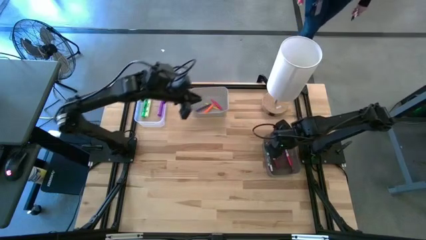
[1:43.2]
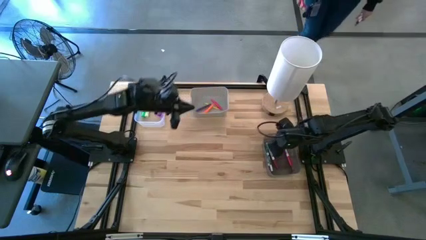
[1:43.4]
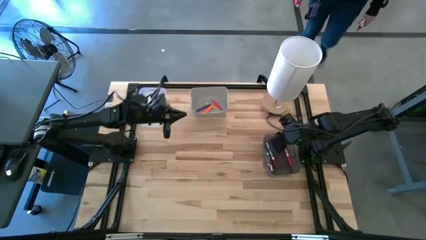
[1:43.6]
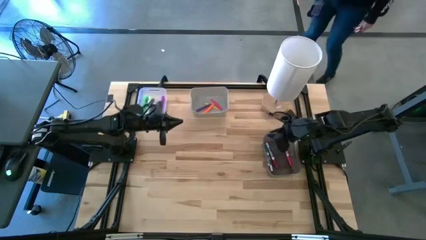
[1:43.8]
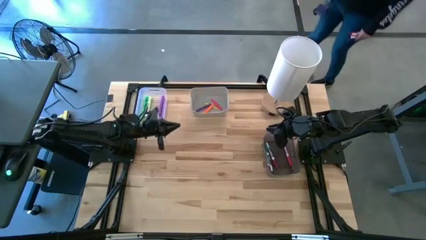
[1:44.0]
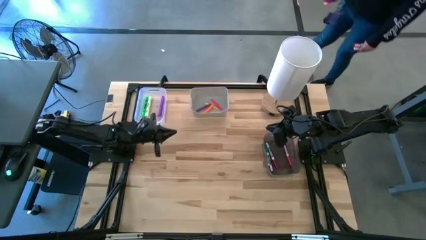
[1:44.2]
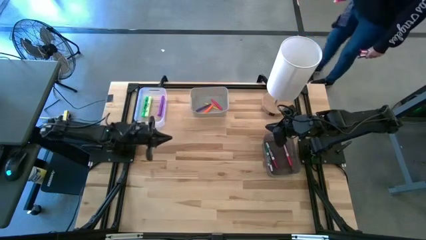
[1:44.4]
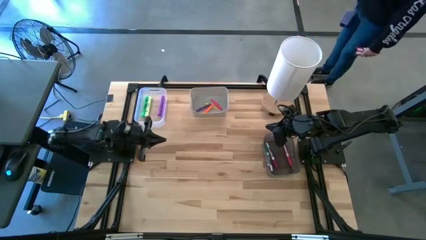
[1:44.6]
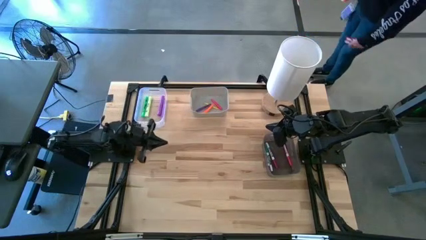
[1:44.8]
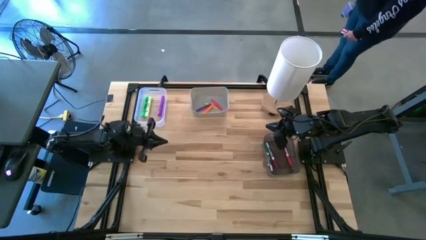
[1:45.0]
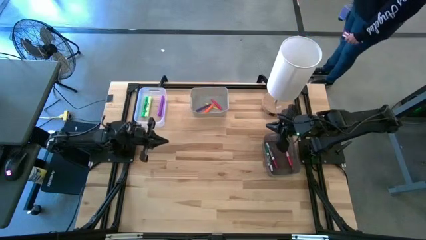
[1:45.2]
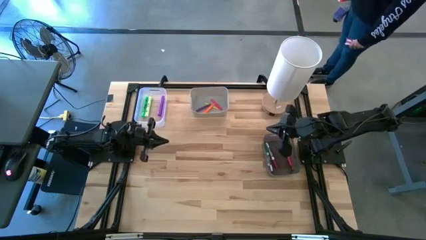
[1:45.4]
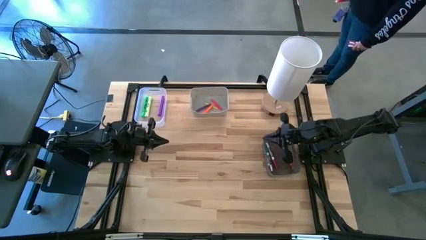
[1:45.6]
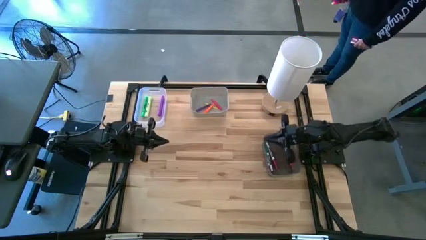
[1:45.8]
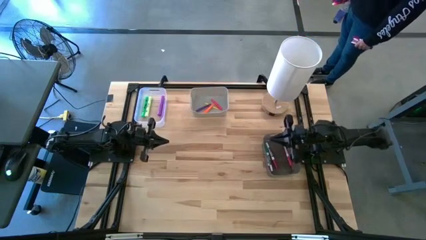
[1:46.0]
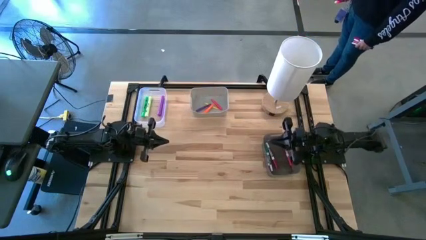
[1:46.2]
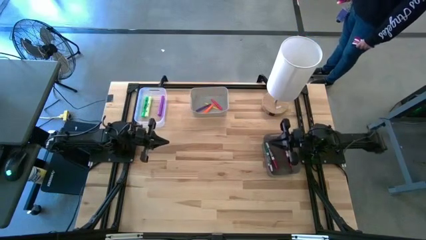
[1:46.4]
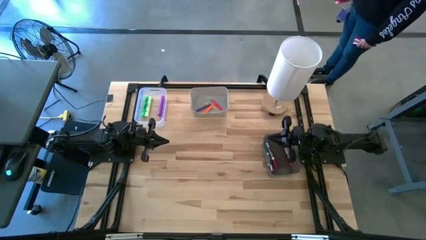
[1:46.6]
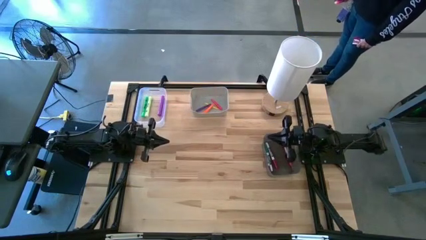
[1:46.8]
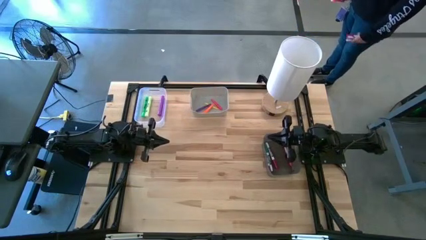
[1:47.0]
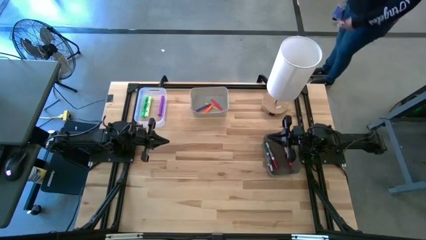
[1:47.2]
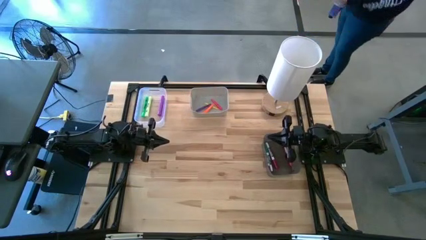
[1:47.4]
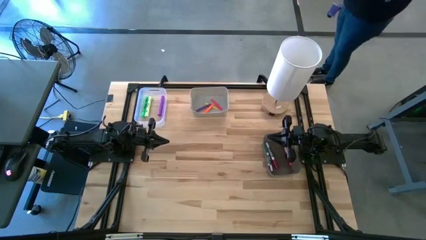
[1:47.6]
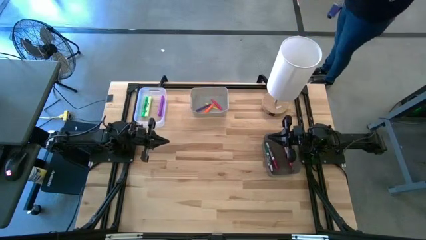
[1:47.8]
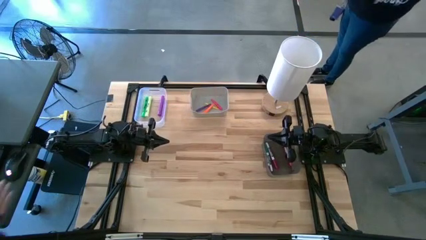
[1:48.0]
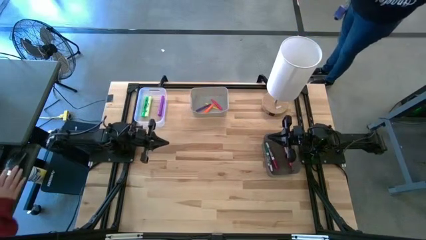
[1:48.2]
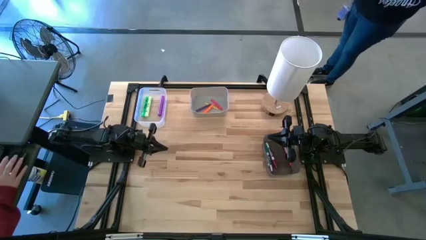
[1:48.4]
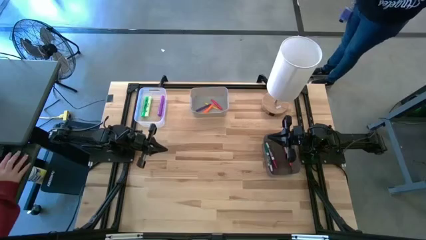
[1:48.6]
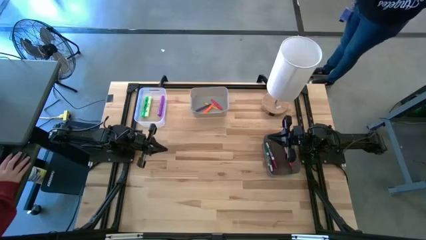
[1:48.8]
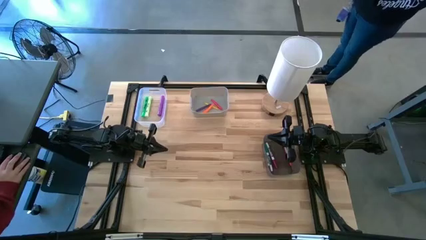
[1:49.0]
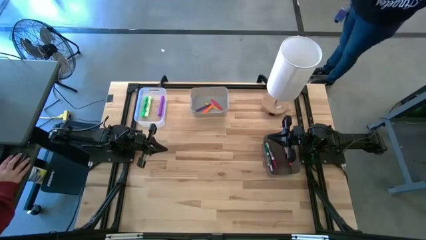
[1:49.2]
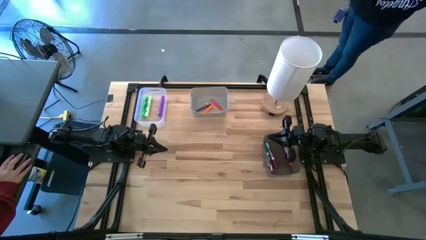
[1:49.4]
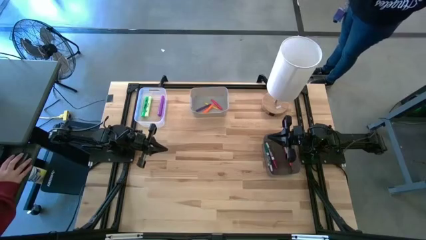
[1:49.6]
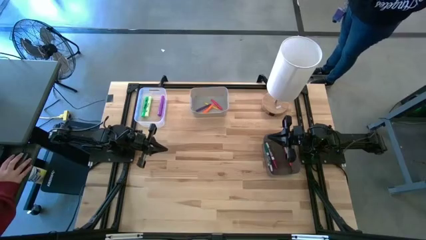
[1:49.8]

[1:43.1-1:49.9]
Task: Pick & Place Markers
Return to Home Position

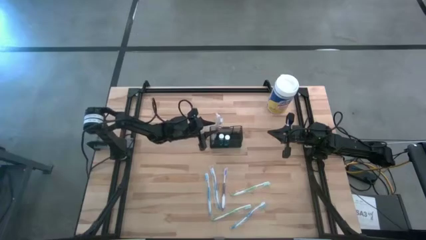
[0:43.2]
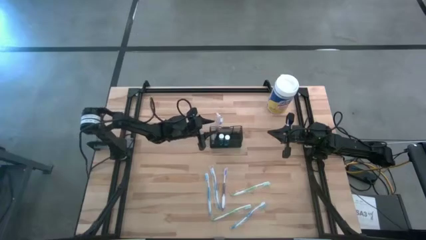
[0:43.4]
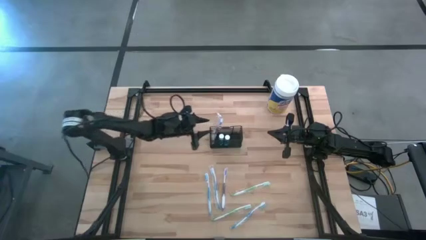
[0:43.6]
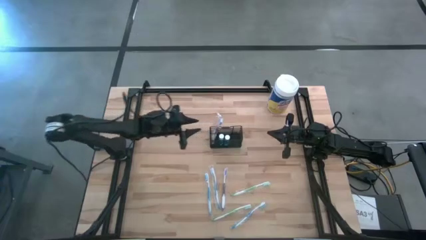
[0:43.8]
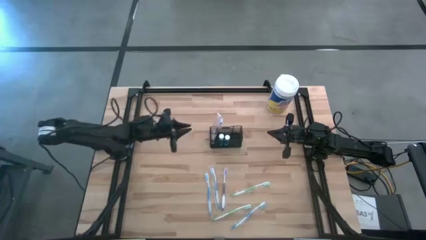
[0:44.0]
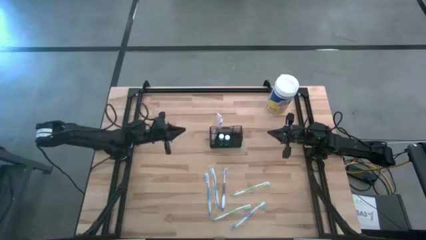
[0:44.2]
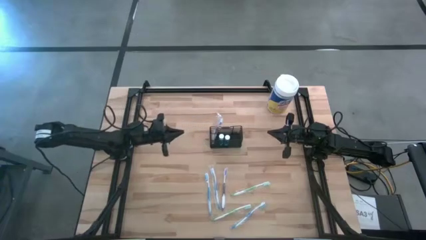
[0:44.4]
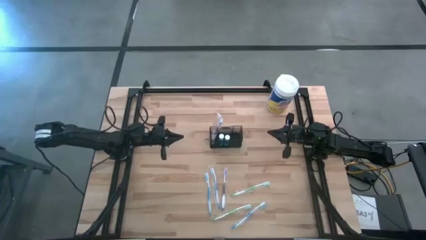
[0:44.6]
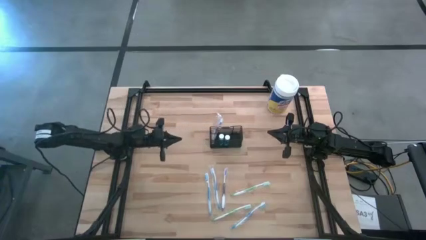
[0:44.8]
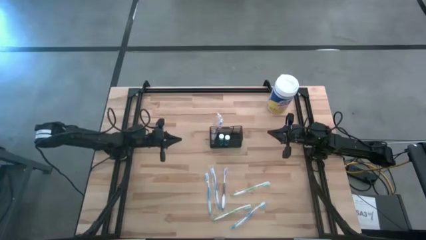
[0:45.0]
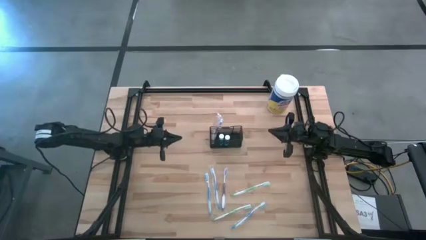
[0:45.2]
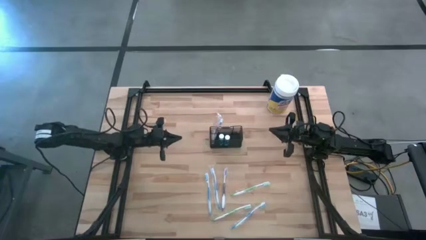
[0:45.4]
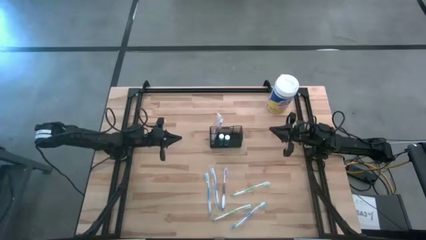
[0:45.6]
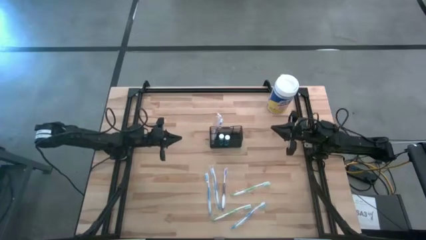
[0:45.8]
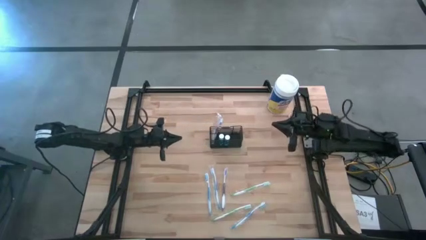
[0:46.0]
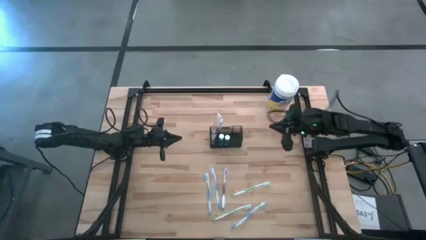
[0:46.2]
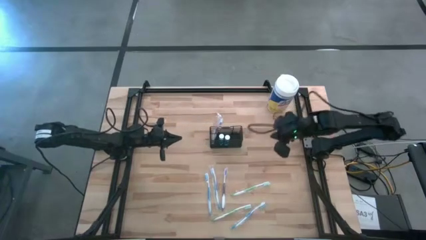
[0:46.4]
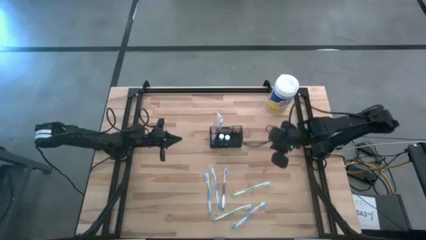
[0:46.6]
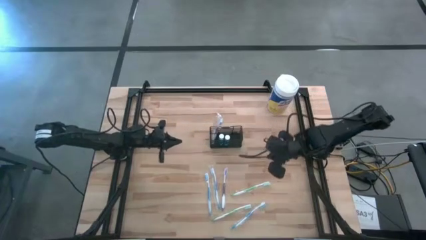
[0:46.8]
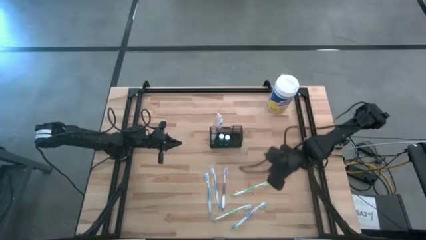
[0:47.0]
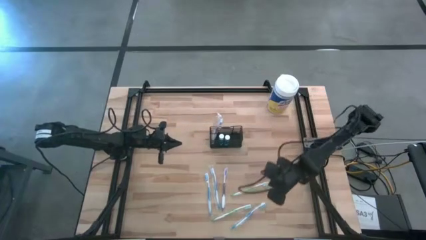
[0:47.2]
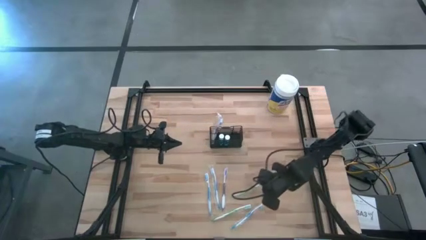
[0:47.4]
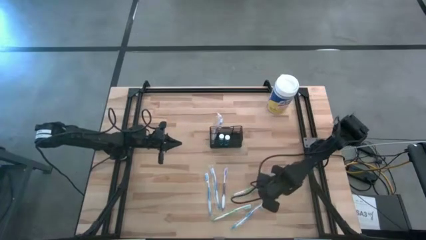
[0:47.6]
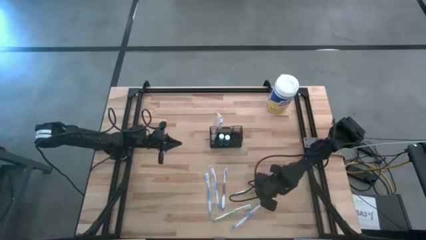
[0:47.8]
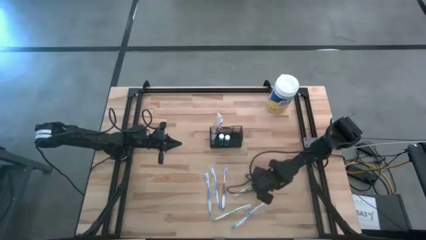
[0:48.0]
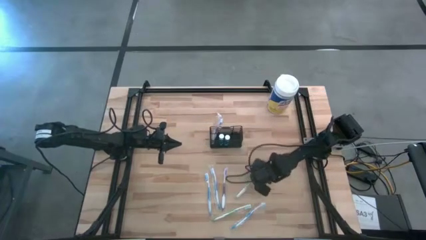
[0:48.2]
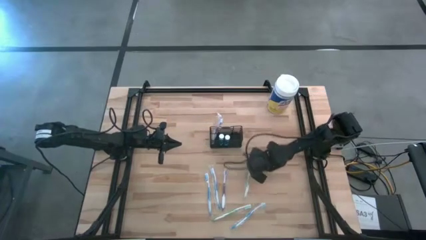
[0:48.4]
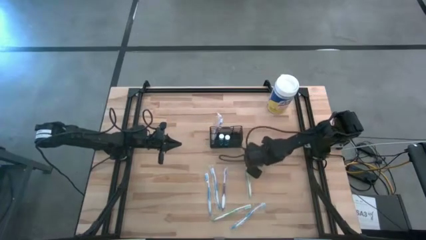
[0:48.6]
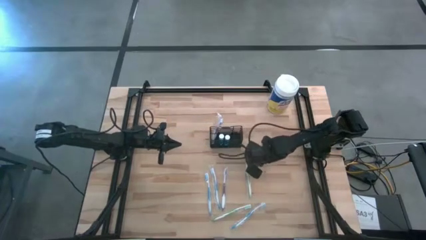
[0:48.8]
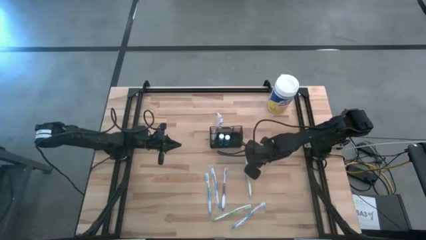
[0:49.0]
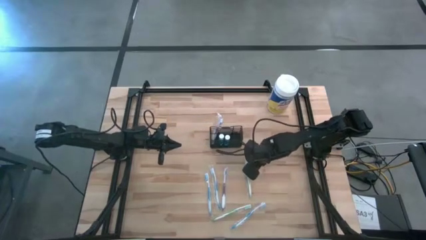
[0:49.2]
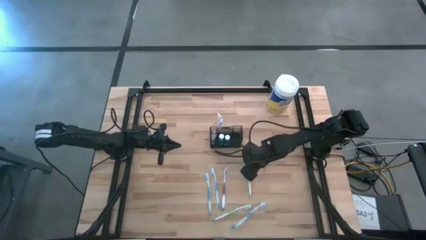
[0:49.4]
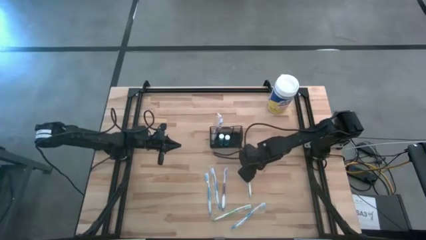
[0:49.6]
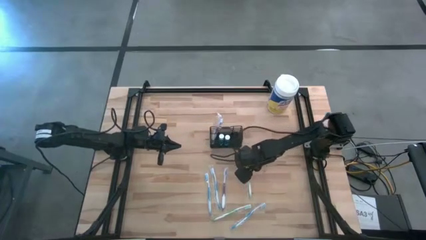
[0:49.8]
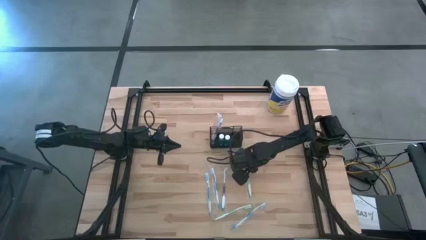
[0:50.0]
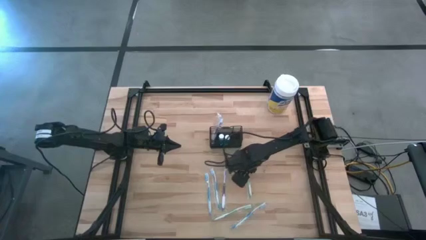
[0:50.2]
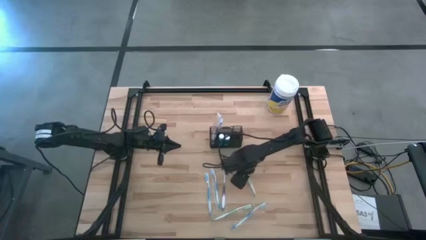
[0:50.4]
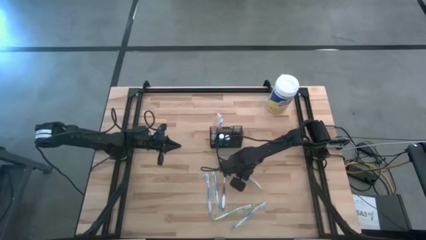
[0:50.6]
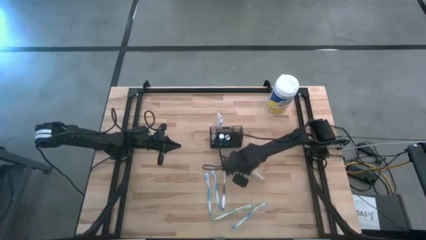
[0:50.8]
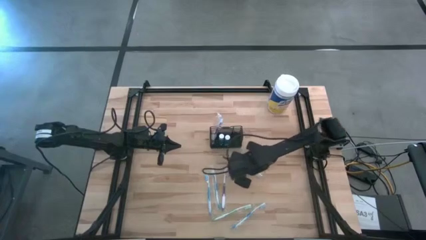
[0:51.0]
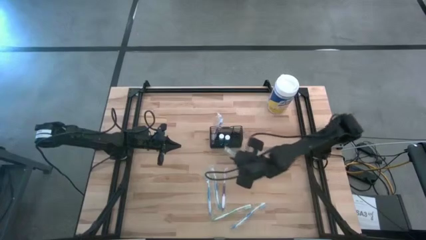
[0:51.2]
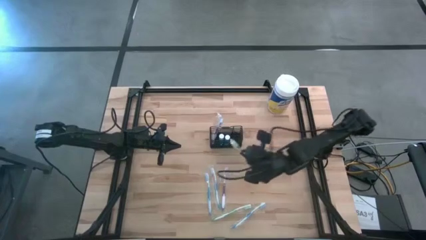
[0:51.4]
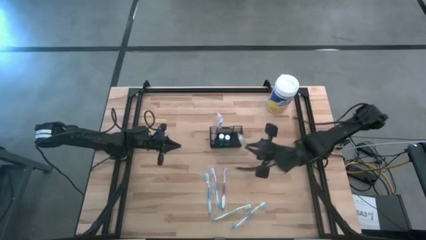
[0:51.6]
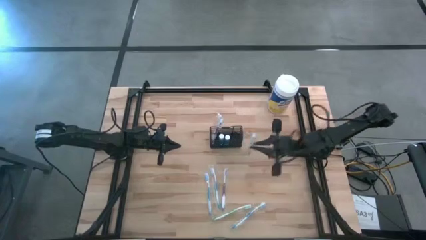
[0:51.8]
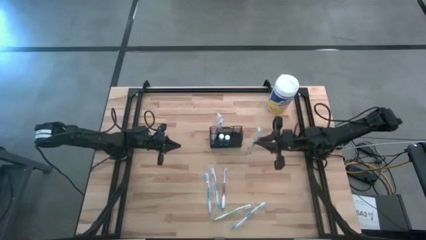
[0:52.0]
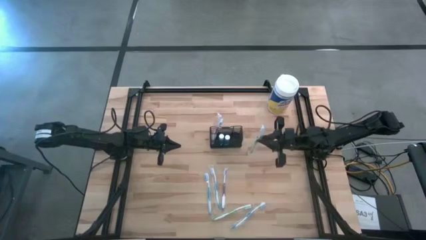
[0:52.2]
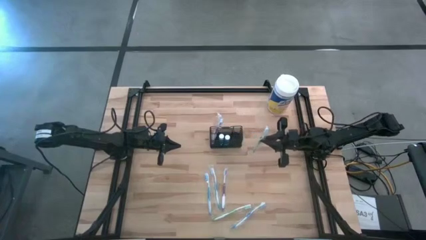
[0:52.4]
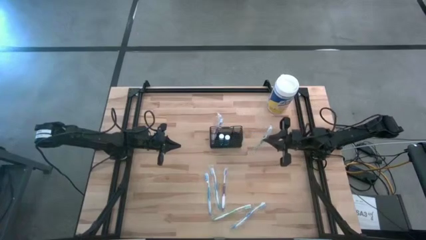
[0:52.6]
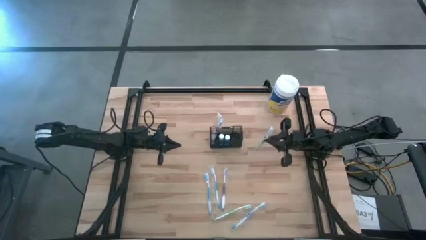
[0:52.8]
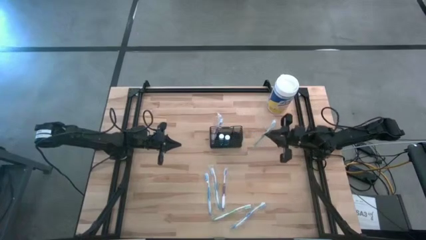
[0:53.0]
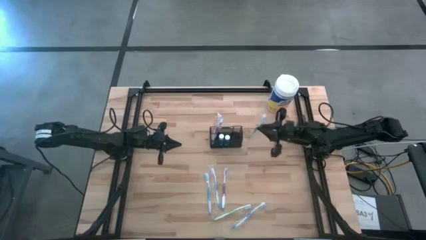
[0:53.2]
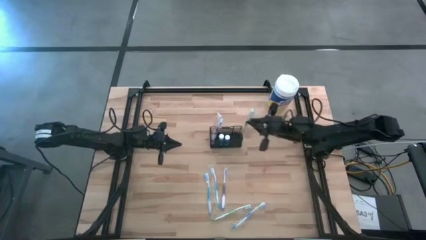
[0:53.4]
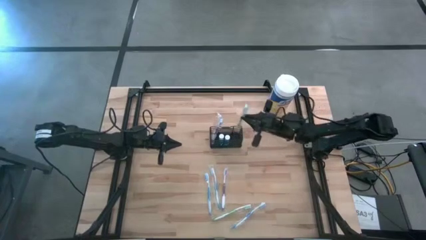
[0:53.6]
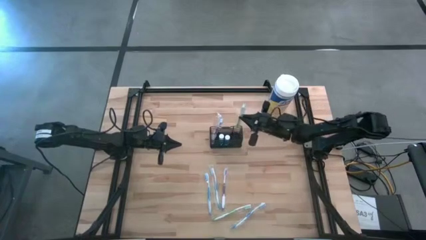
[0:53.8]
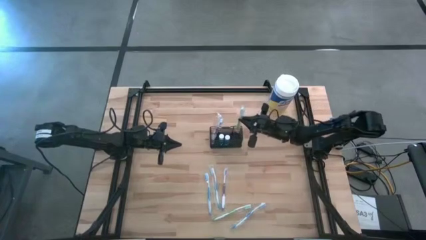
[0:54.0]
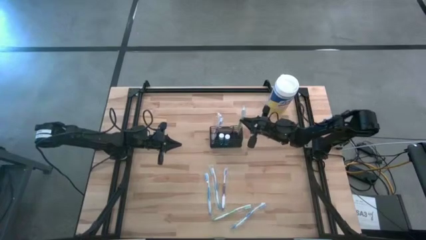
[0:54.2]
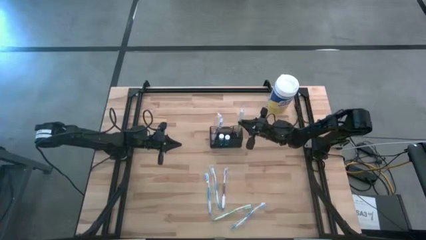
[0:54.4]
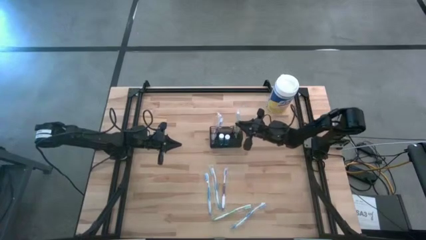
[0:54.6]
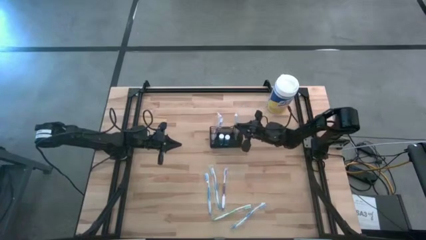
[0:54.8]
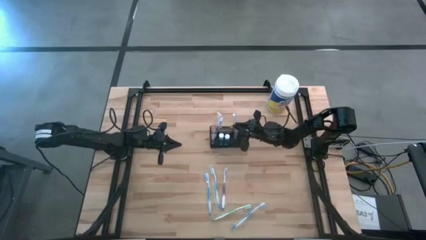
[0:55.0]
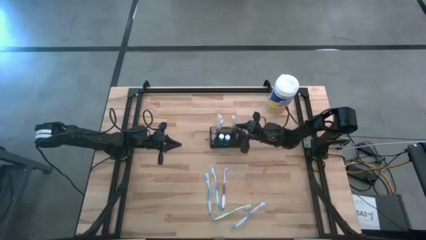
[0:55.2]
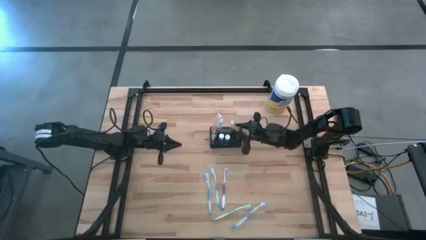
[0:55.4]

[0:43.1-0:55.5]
Task: Pick & Place toothbrushing station
Put the top green toothbrush into the black wire organizer
